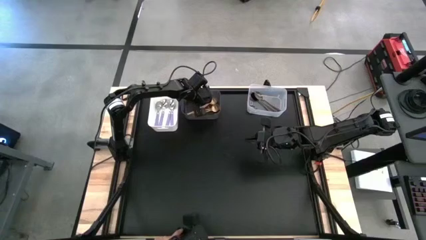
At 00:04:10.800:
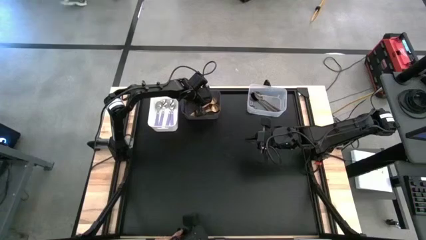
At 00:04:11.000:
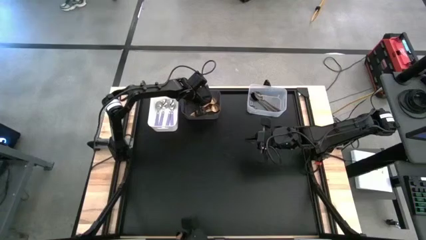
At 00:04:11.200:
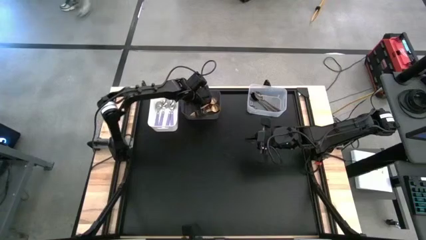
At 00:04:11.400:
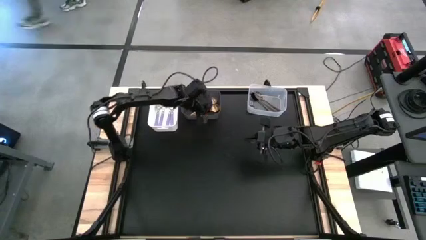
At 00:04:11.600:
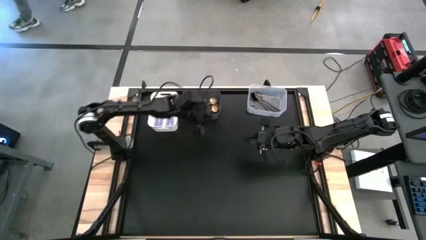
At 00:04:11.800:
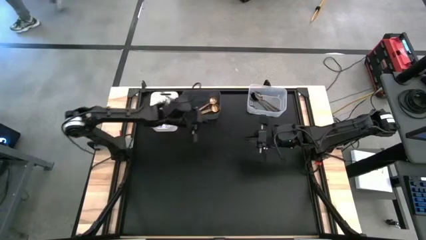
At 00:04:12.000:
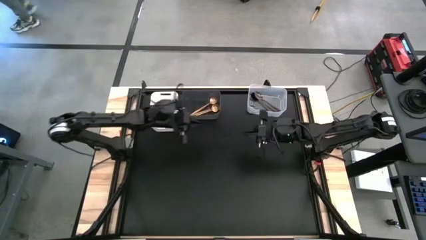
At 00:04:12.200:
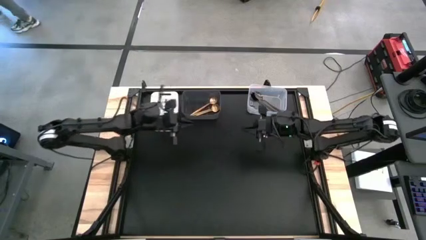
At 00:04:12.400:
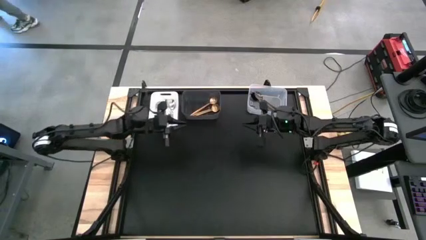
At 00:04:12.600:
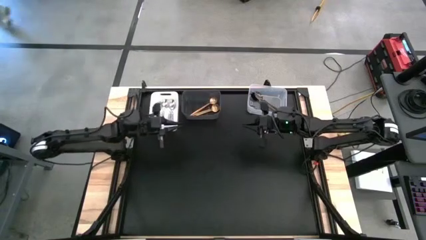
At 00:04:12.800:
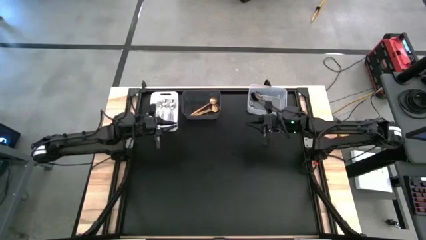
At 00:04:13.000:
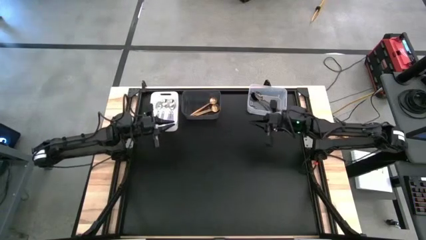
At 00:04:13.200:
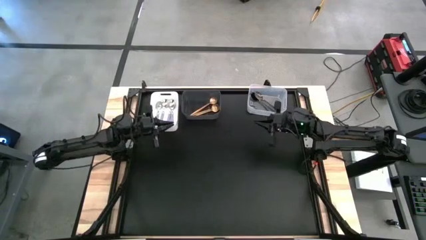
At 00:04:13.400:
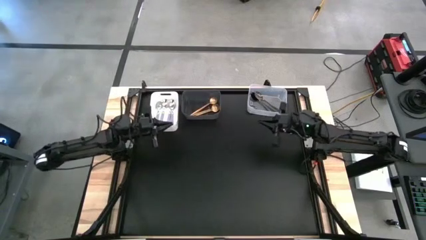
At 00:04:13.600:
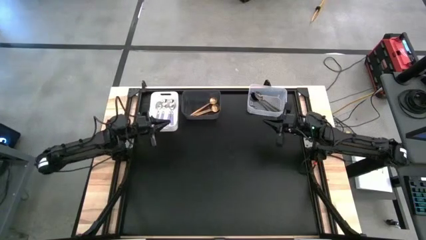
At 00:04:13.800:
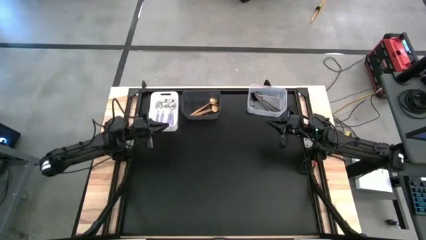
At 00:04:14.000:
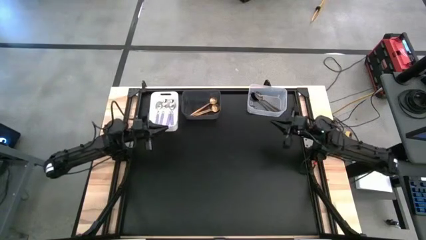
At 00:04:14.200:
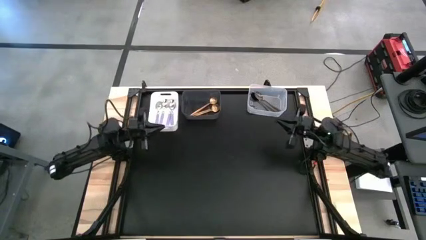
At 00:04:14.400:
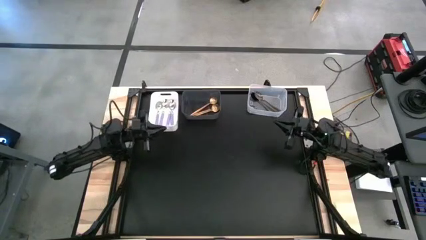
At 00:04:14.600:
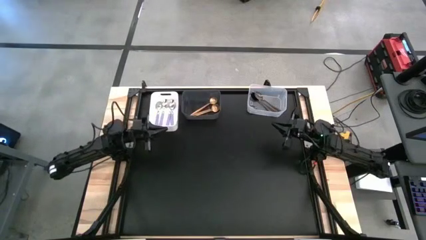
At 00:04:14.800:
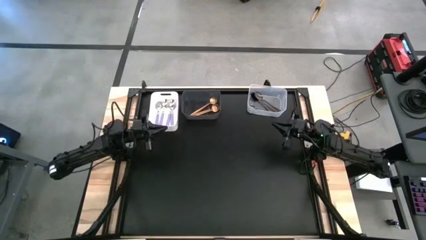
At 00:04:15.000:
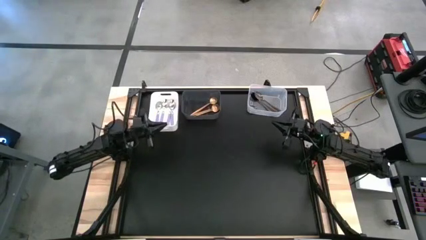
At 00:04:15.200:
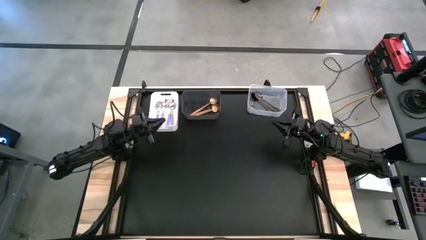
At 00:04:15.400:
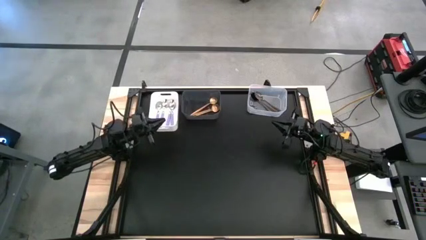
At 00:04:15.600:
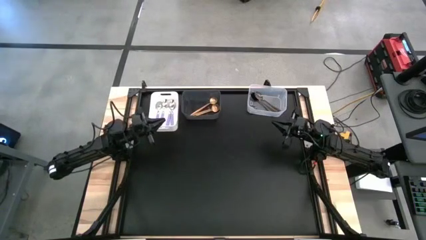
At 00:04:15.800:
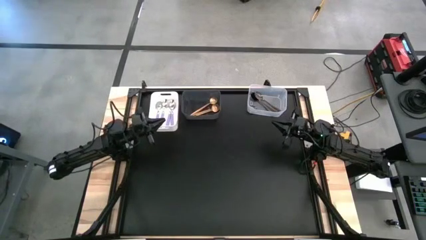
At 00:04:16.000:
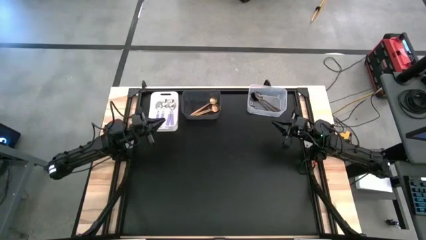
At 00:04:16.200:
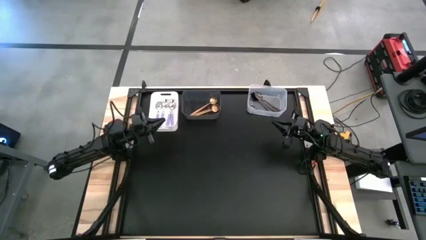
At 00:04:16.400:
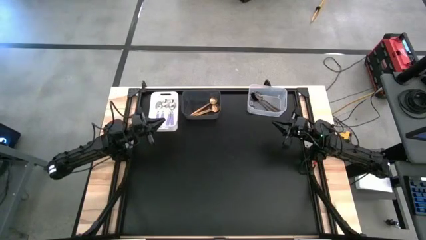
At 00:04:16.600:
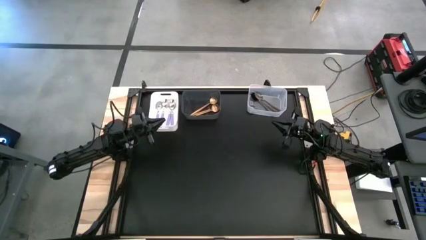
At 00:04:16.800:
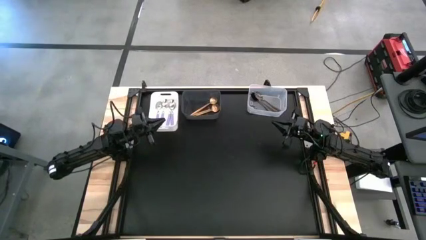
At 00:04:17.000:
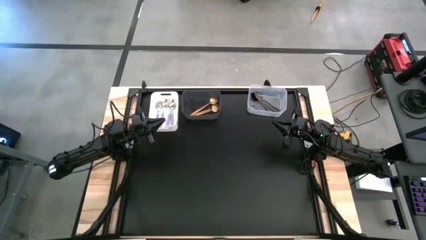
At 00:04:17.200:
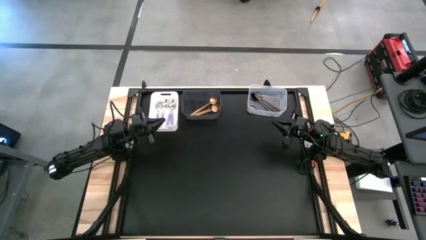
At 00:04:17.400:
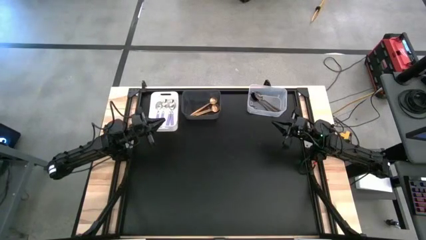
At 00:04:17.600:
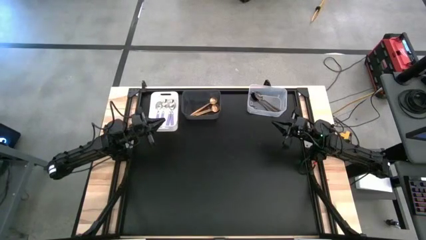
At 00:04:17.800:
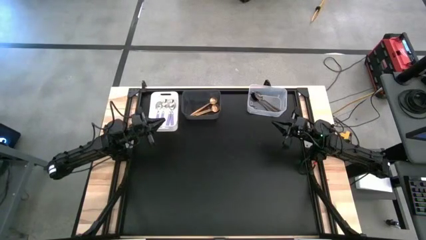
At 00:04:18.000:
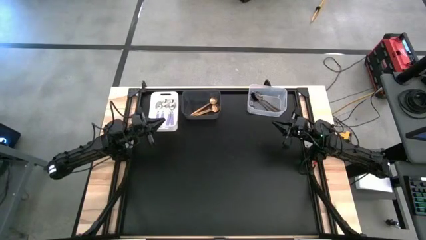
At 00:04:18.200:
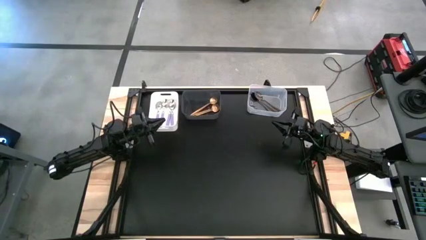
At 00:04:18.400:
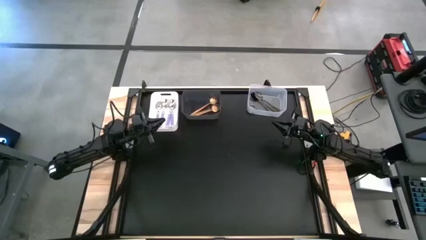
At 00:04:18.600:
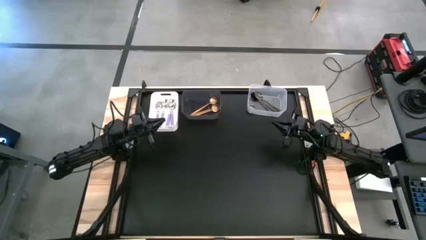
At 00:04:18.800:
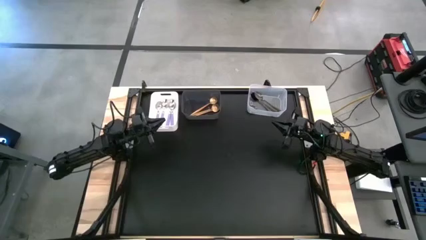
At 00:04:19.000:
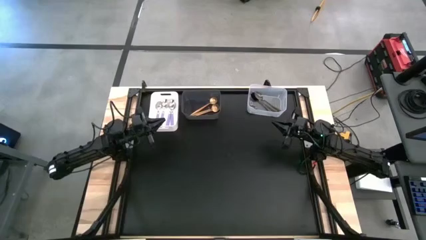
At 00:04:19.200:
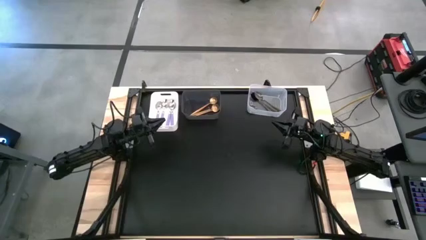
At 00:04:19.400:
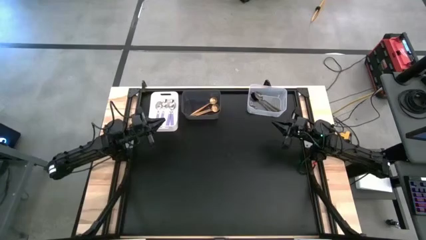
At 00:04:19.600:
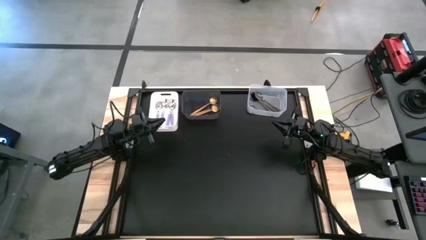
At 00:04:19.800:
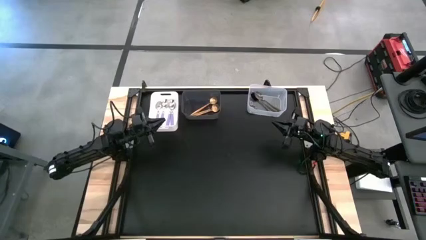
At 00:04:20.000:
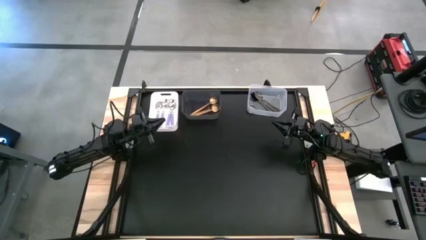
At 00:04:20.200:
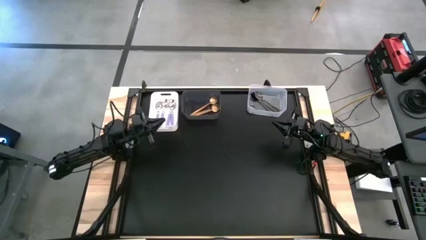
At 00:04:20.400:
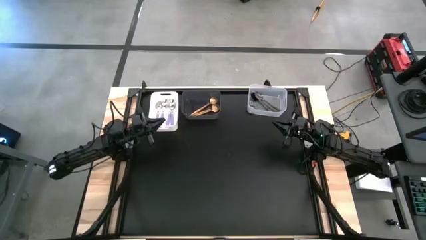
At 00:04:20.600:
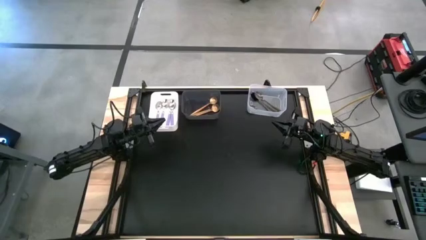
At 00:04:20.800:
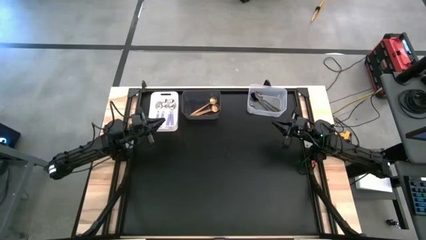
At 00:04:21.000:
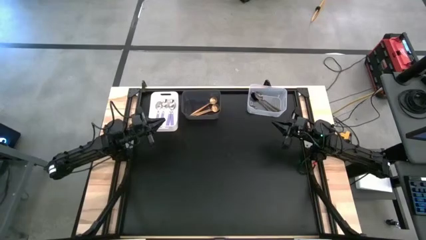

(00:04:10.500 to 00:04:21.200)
Task: Sort silverware by color (type)
Return to Home Position
